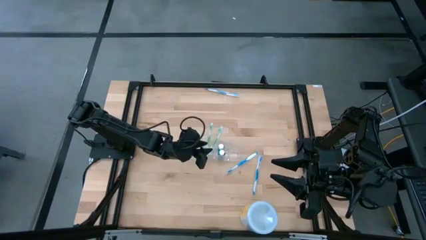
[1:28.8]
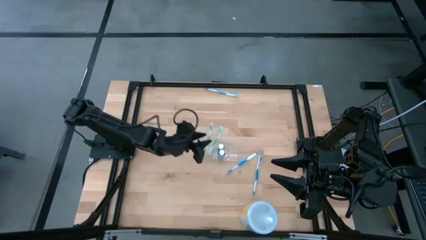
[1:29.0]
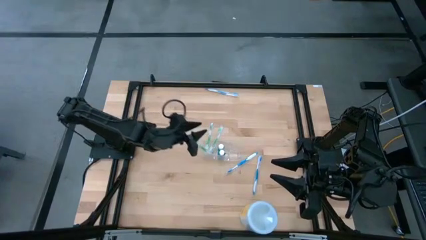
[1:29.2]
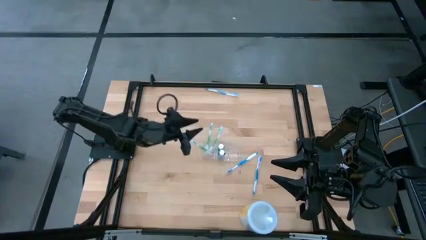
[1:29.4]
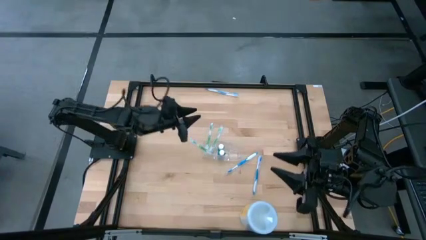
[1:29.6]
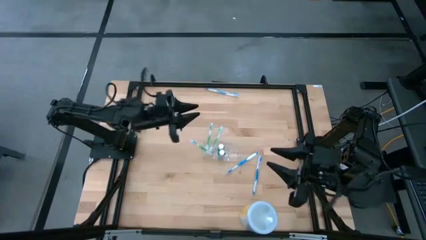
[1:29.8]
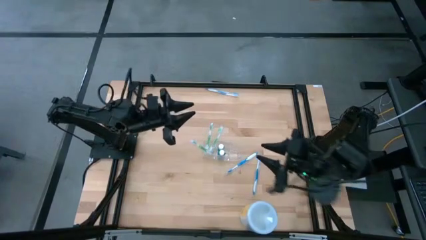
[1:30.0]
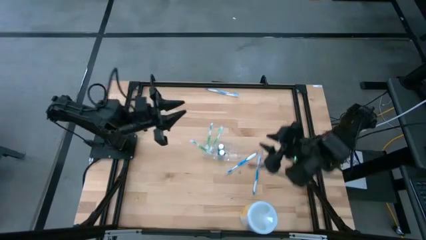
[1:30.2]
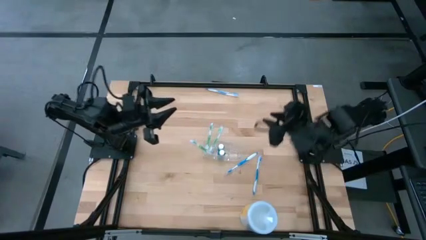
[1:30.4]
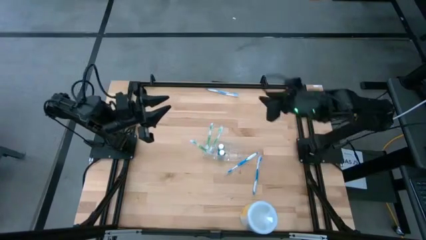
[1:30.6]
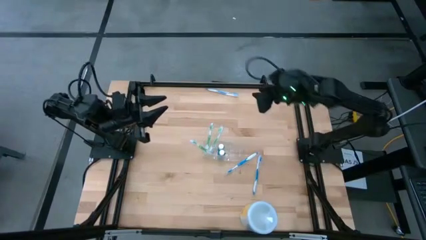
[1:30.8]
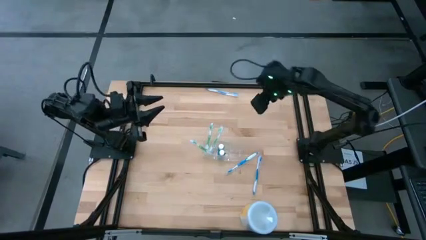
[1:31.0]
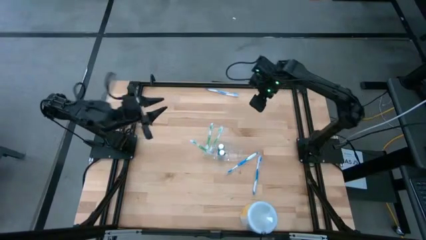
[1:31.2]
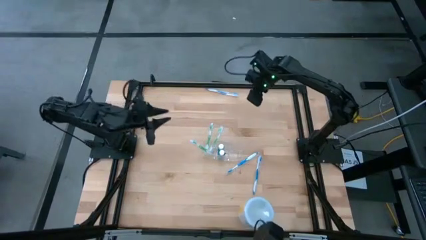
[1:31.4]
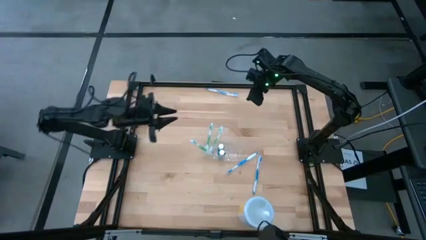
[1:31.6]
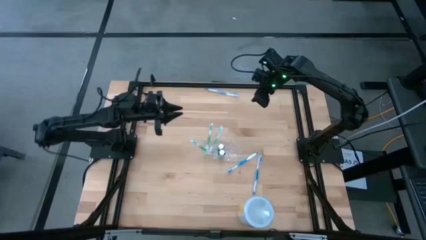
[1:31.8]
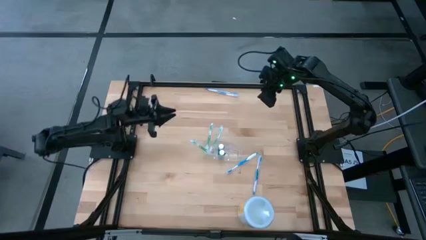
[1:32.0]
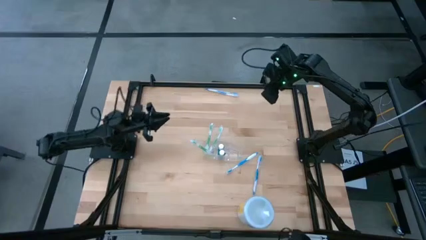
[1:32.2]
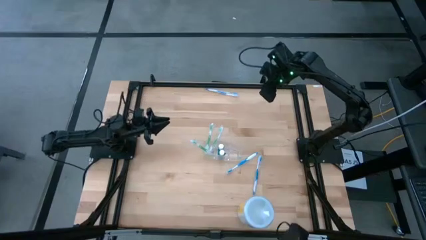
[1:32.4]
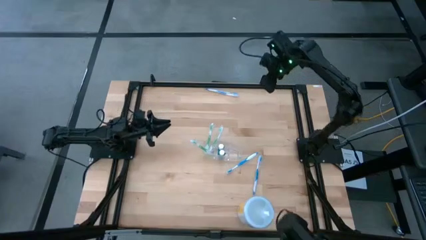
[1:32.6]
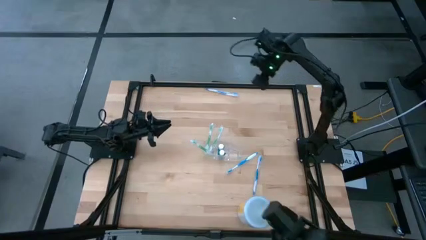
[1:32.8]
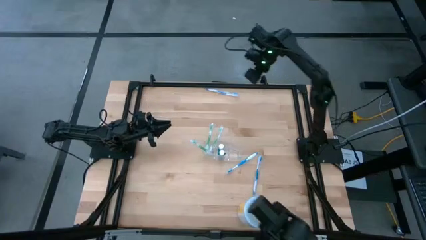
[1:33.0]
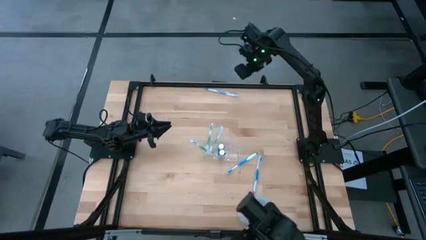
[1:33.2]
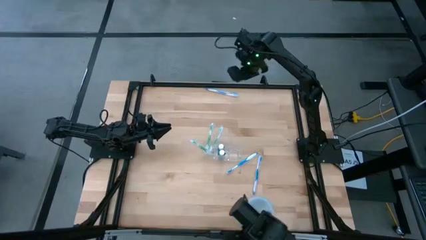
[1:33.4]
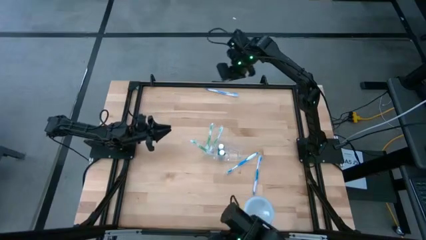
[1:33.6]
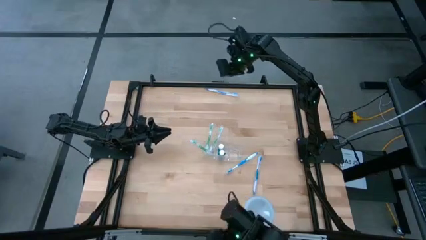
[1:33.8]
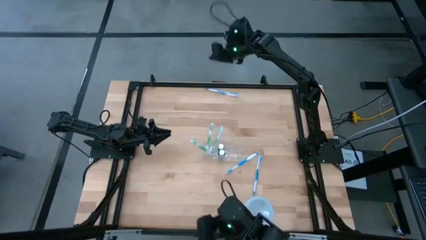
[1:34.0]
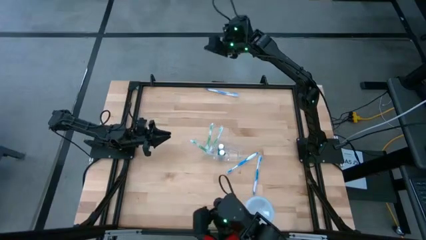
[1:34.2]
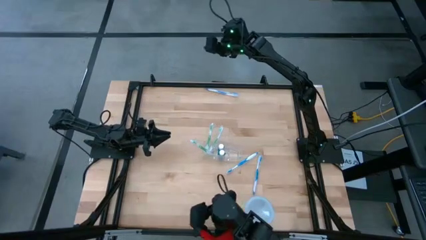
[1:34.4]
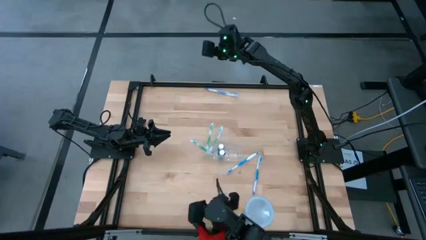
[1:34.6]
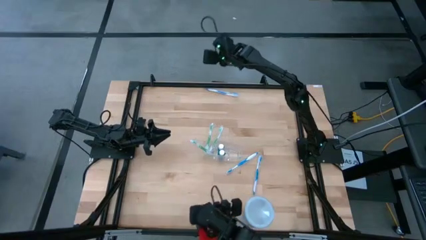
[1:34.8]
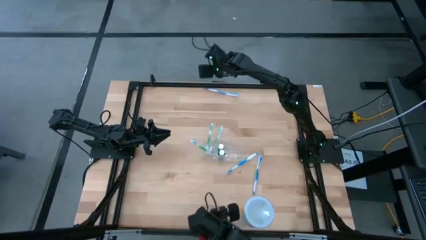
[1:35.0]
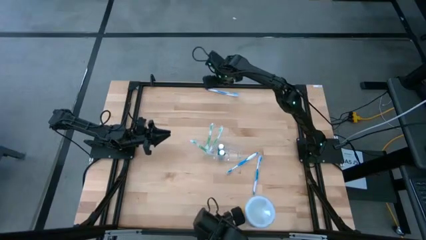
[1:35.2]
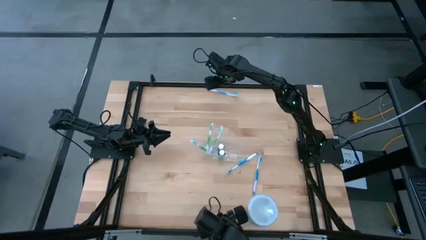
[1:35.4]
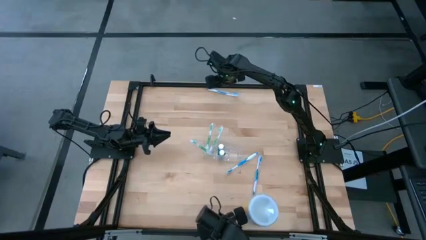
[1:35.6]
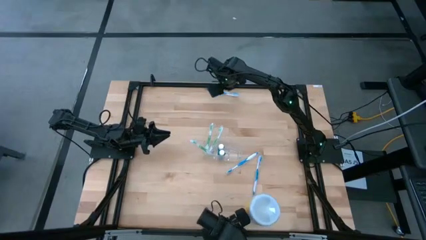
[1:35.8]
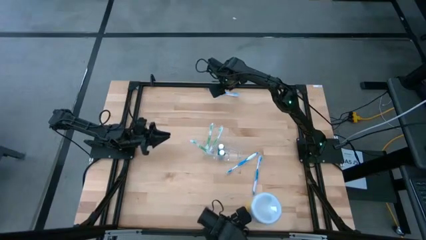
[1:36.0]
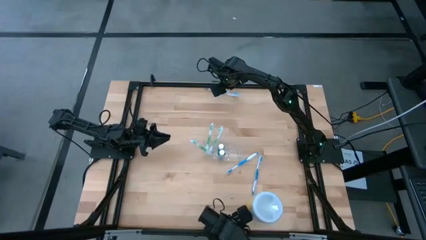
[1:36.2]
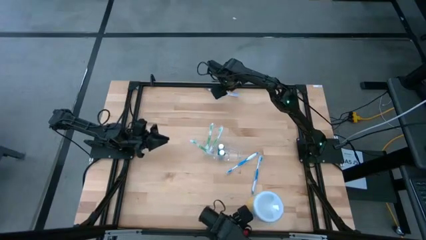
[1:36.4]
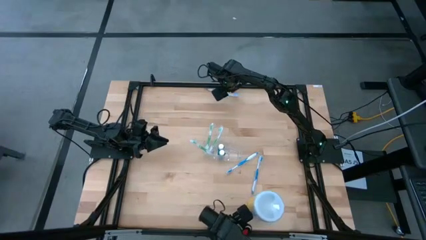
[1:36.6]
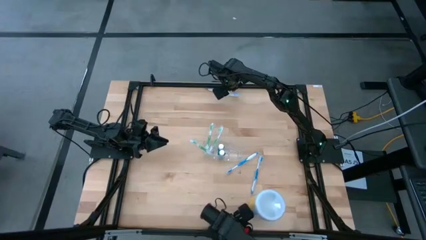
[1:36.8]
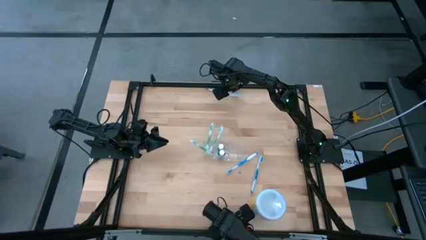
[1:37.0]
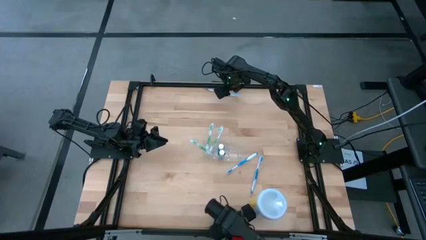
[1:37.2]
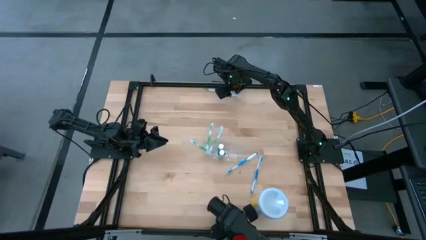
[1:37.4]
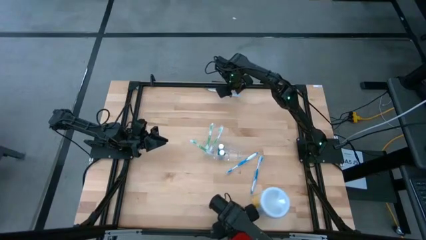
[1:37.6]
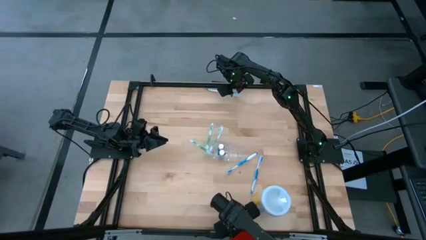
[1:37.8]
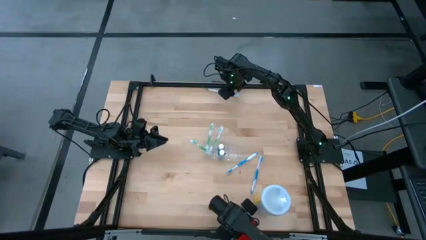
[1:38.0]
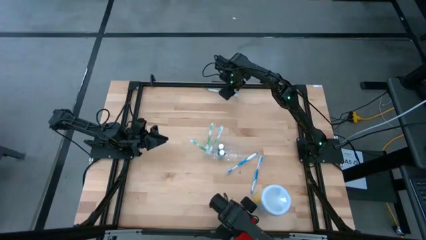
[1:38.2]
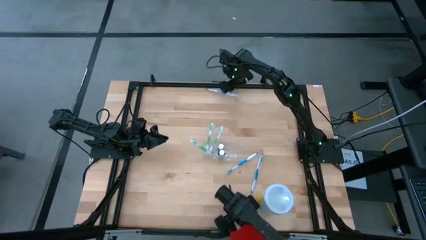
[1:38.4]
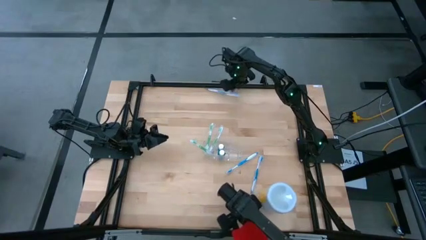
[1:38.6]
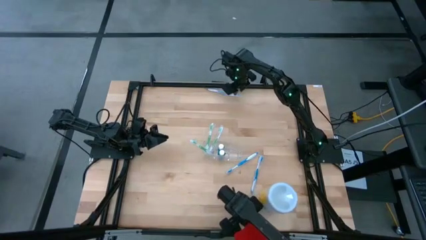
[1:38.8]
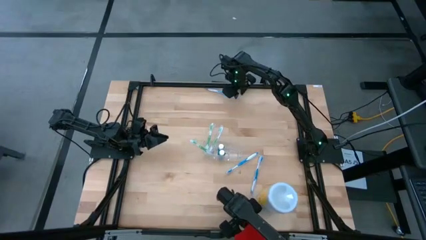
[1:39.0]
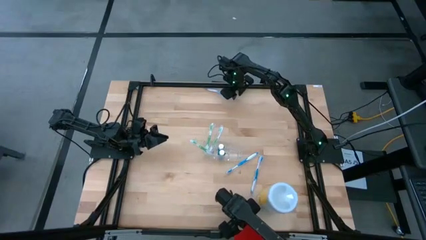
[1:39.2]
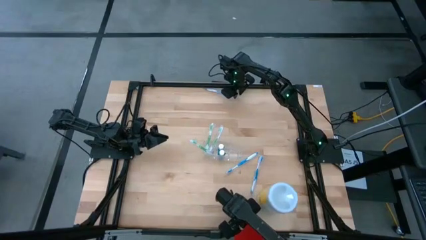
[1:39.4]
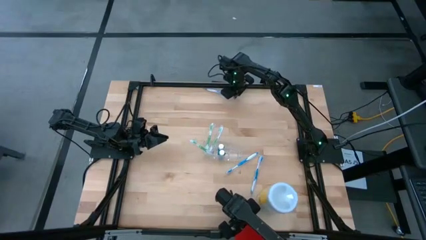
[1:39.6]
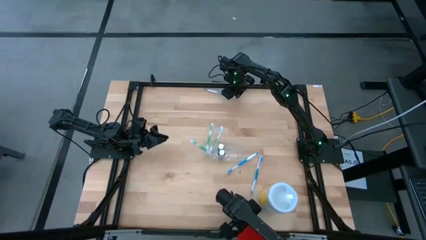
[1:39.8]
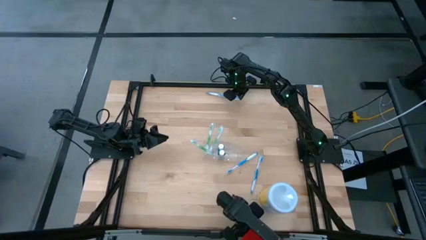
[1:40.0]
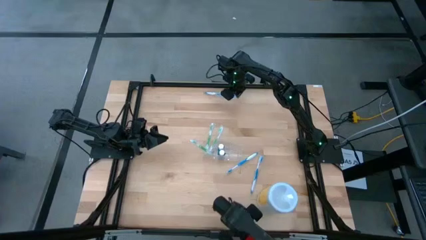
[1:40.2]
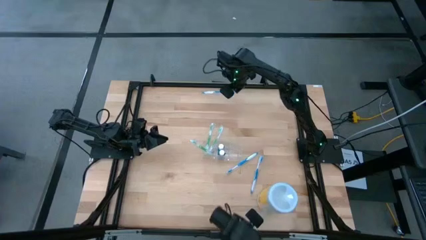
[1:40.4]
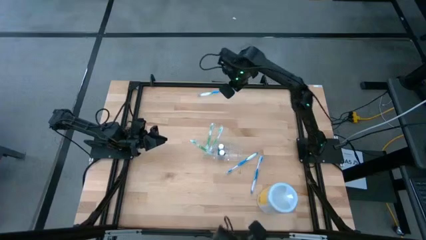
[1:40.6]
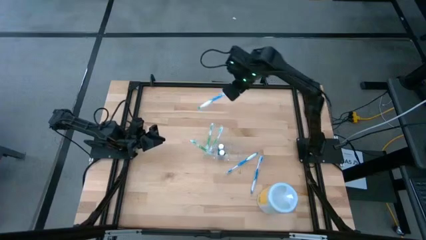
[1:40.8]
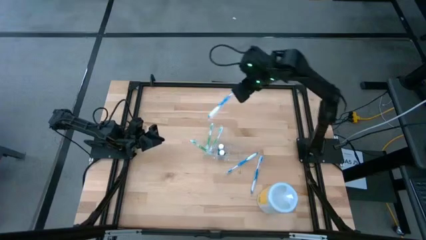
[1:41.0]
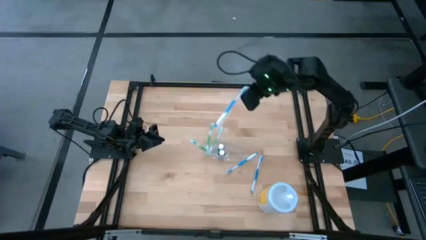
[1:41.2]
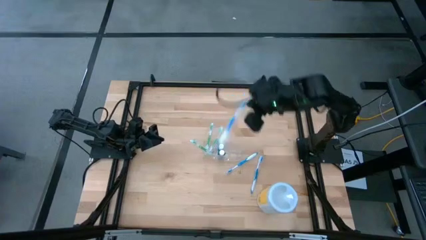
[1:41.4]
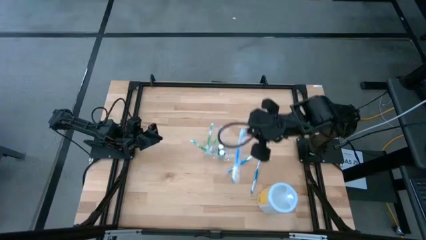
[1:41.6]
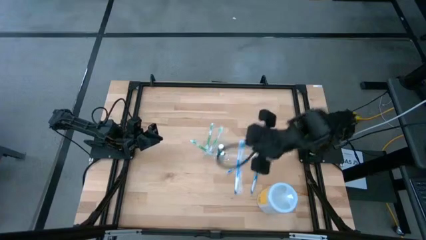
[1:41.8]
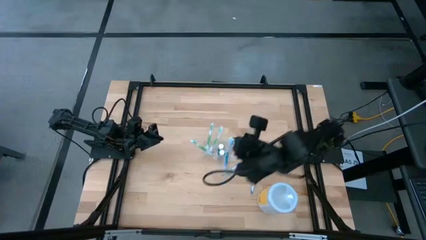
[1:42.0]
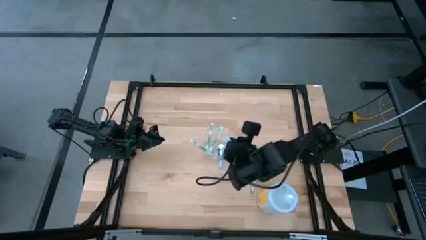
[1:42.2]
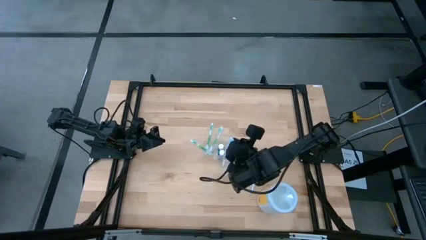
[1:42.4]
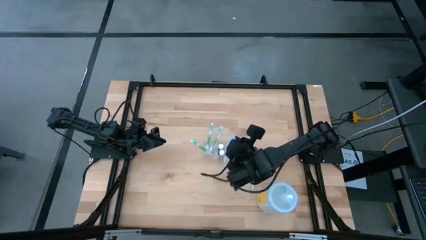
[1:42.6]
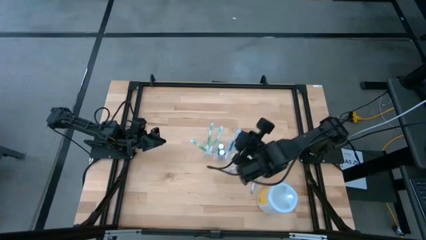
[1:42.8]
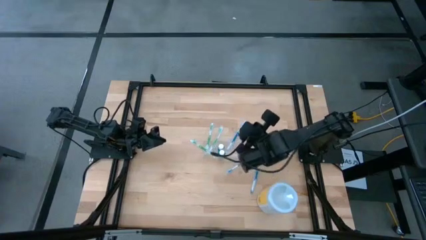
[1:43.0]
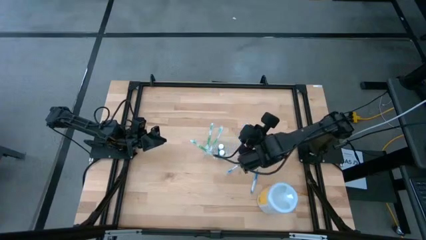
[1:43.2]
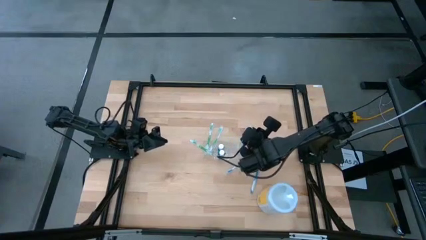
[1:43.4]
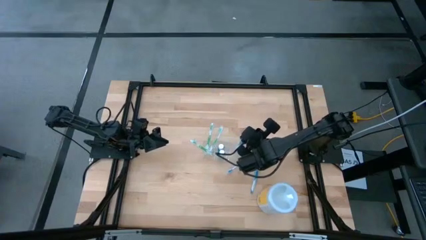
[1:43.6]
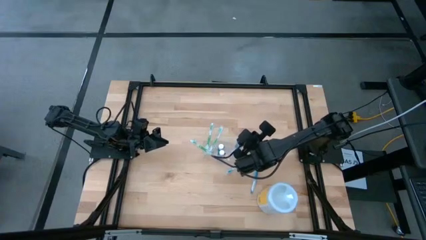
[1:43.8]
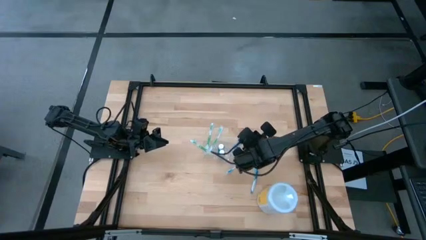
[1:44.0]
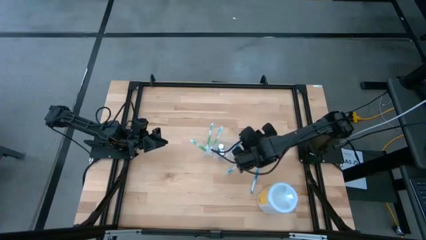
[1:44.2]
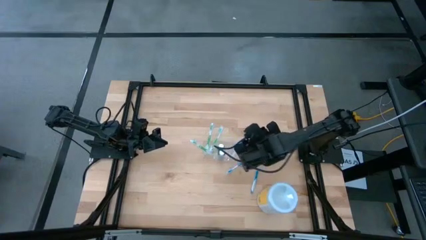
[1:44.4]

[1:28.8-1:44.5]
Task: Pick & Place toothbrushing station
Put the top blue toothbrush into the transparent organizer

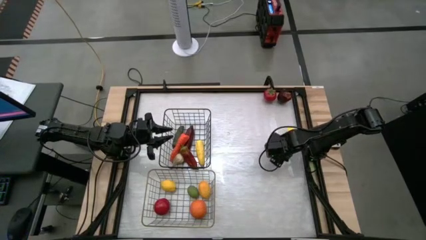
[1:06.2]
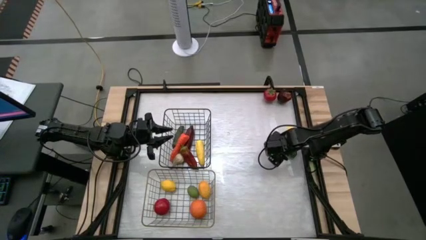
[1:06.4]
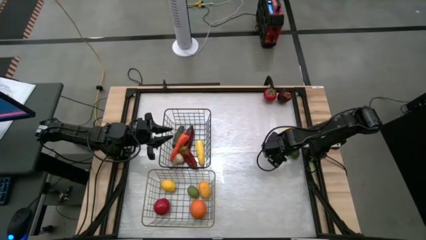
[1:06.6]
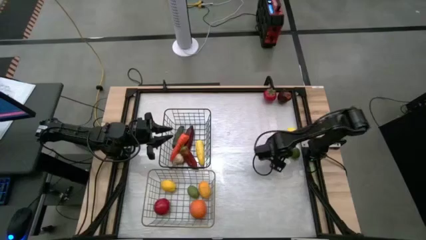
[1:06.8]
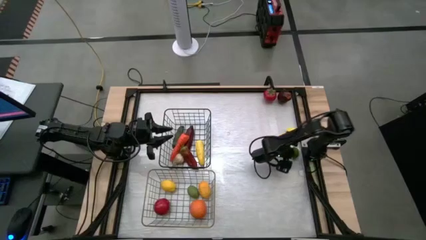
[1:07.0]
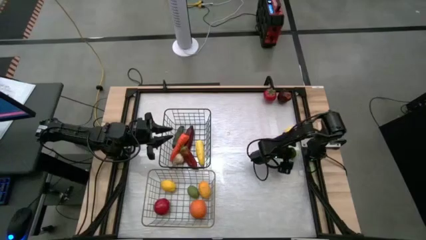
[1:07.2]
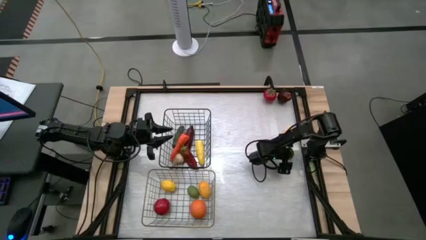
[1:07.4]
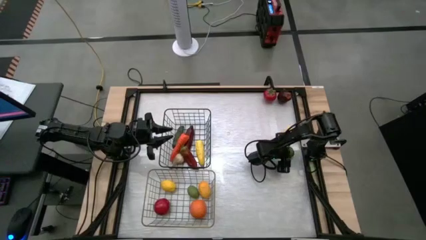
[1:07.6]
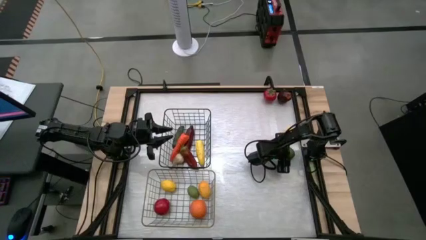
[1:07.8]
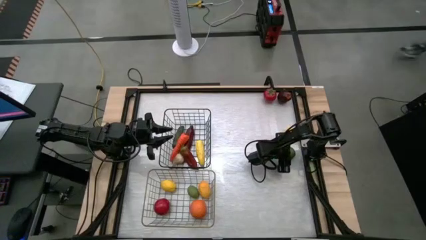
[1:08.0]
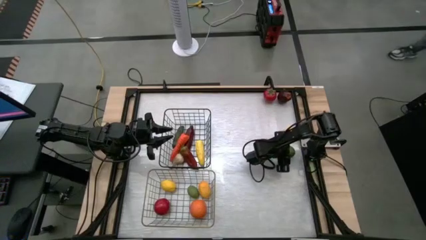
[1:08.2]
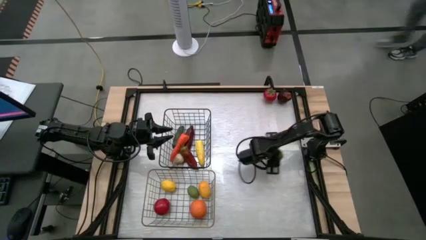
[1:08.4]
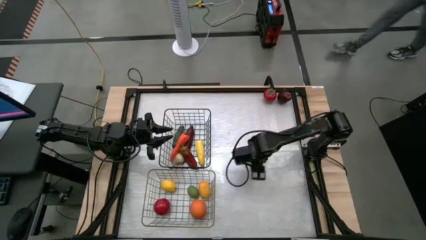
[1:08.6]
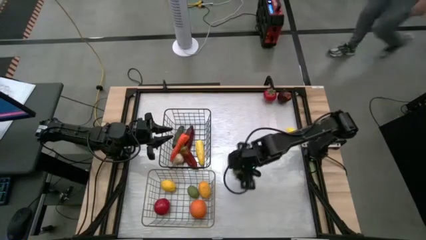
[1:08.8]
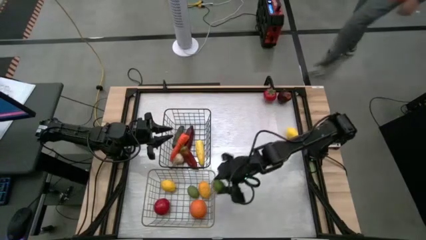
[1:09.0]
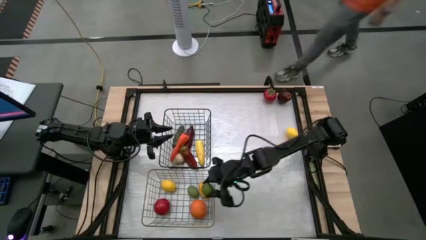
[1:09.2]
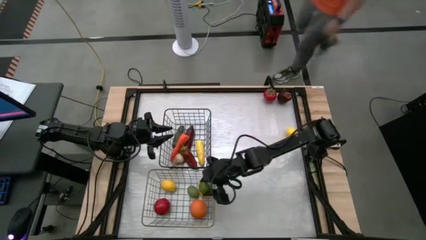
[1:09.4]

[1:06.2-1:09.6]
Task: Sort produce into baskets
Put the lime into the silver wire basket
